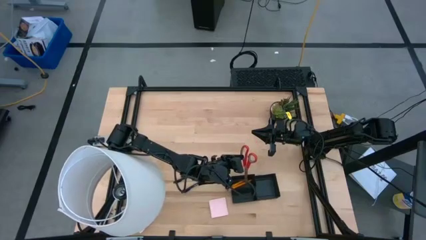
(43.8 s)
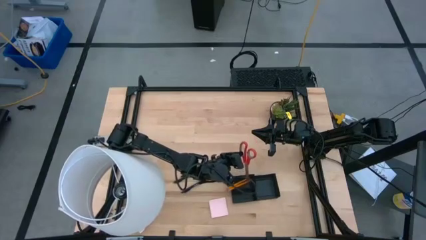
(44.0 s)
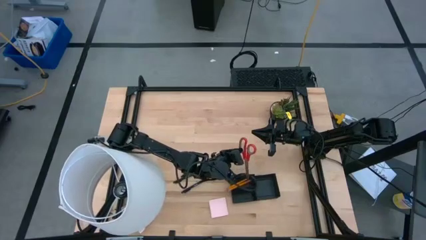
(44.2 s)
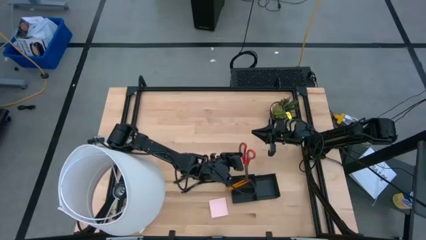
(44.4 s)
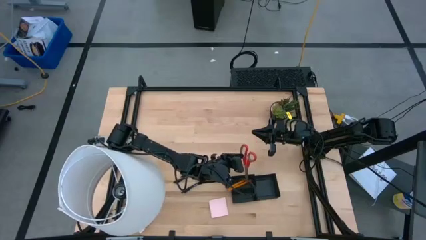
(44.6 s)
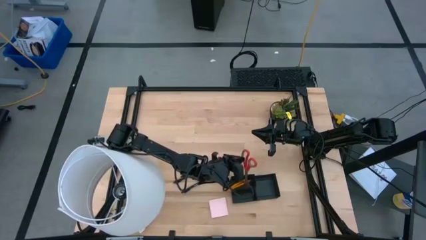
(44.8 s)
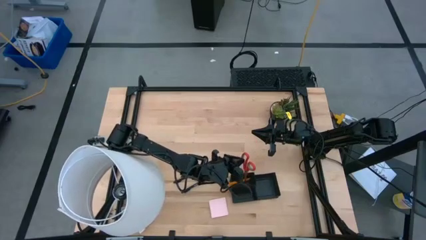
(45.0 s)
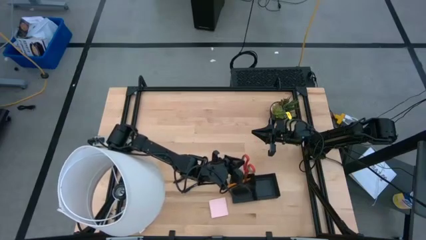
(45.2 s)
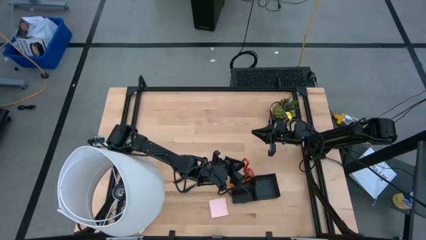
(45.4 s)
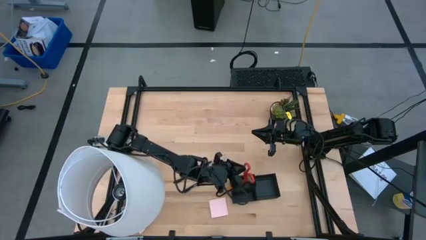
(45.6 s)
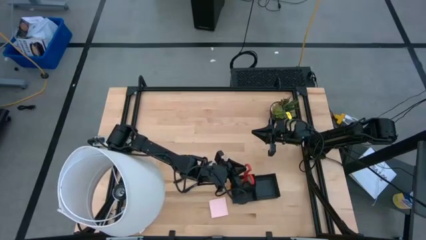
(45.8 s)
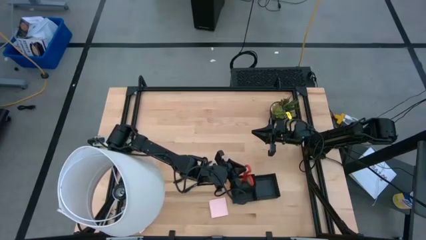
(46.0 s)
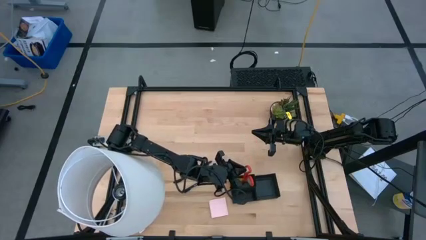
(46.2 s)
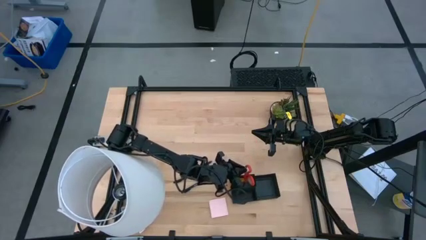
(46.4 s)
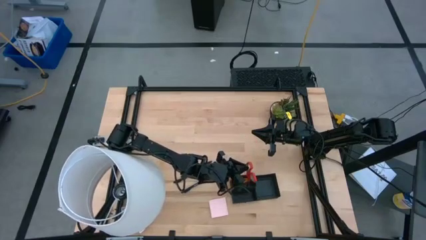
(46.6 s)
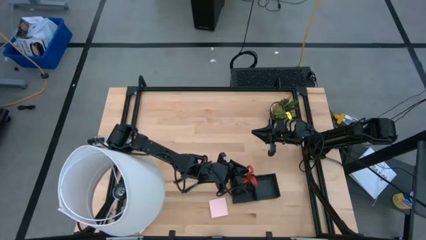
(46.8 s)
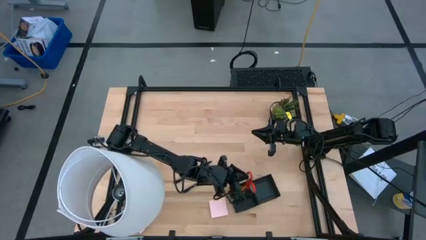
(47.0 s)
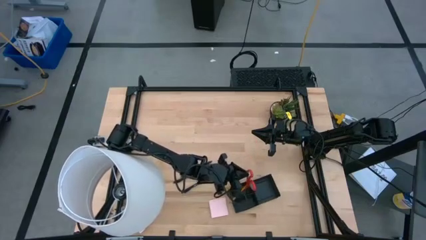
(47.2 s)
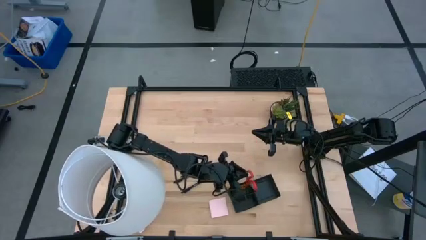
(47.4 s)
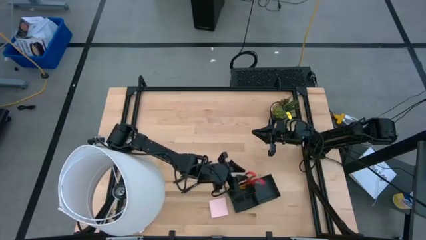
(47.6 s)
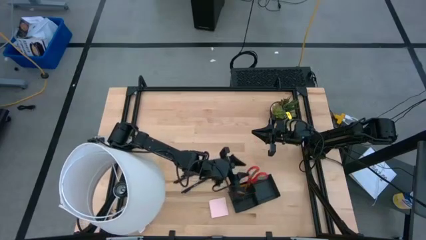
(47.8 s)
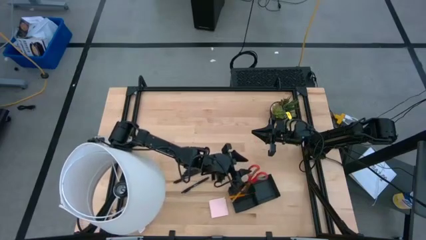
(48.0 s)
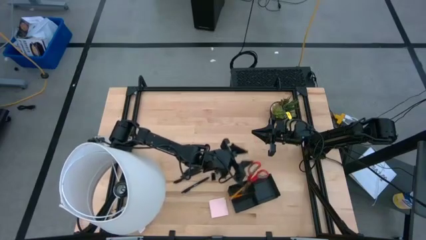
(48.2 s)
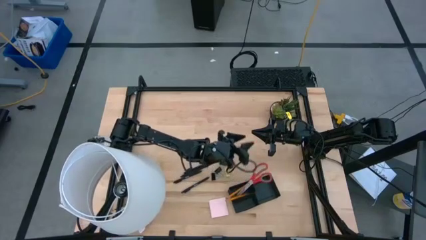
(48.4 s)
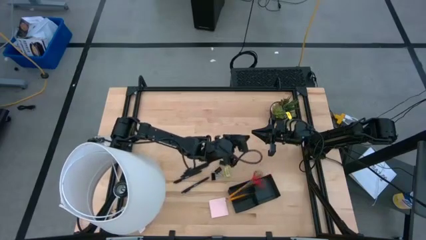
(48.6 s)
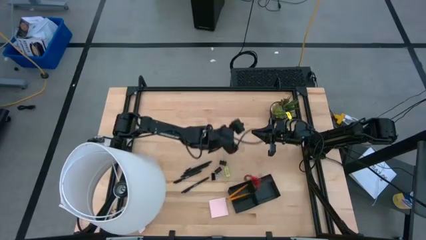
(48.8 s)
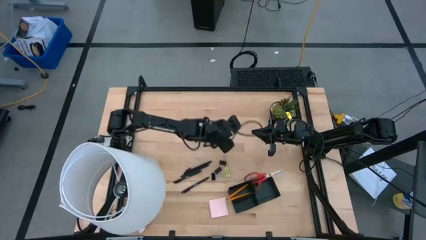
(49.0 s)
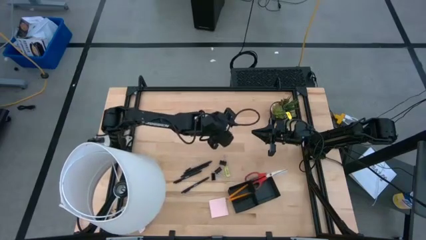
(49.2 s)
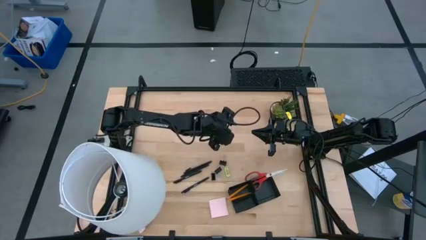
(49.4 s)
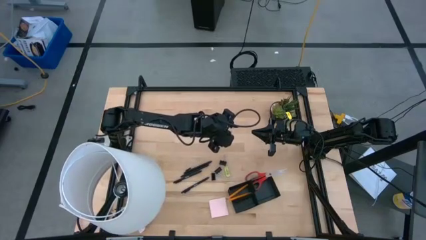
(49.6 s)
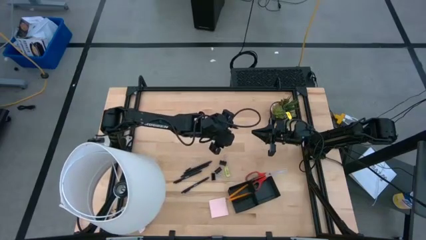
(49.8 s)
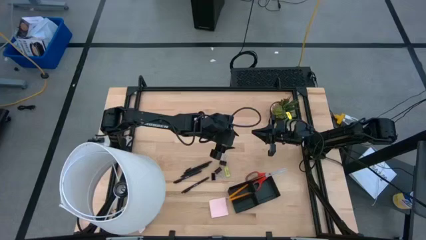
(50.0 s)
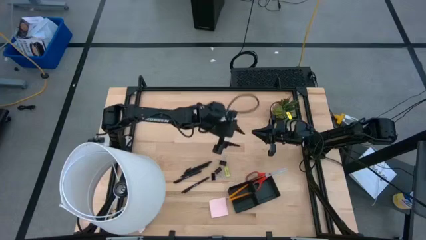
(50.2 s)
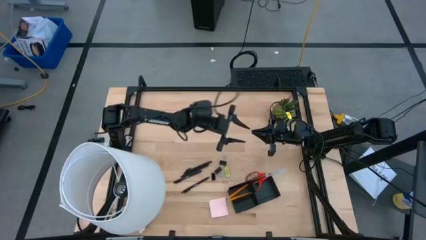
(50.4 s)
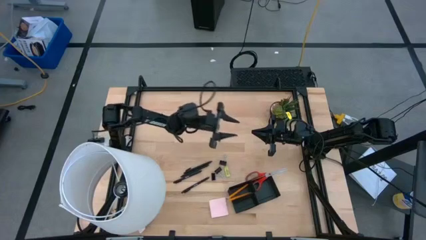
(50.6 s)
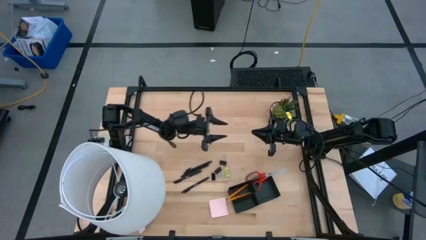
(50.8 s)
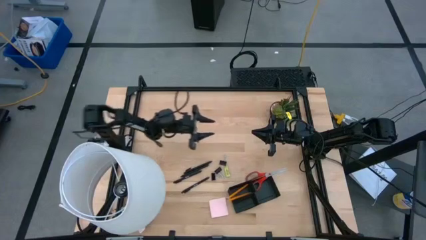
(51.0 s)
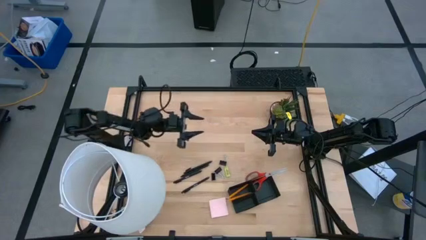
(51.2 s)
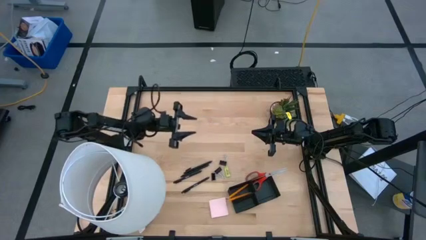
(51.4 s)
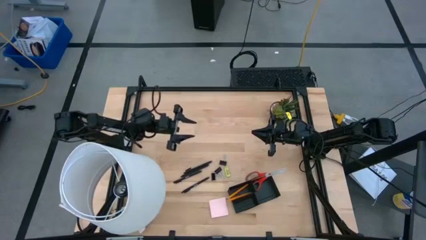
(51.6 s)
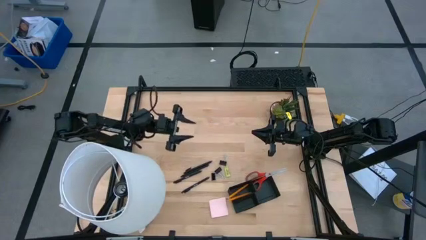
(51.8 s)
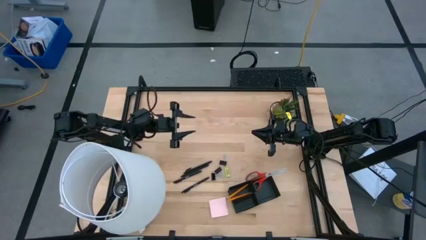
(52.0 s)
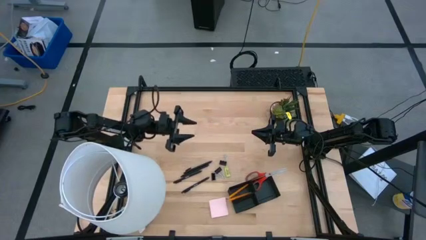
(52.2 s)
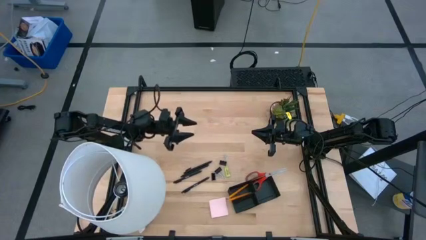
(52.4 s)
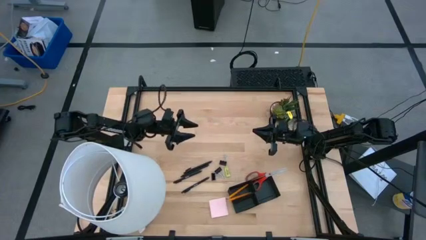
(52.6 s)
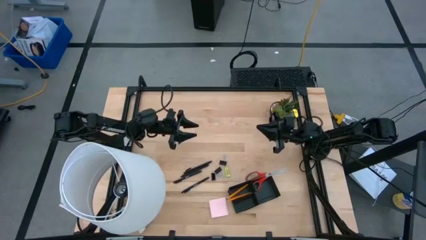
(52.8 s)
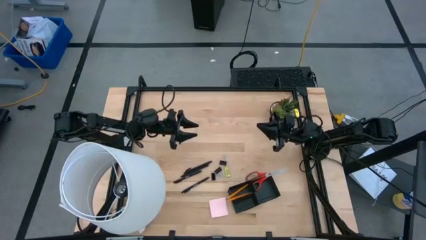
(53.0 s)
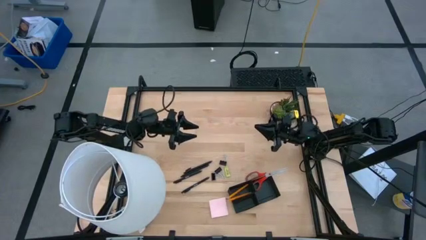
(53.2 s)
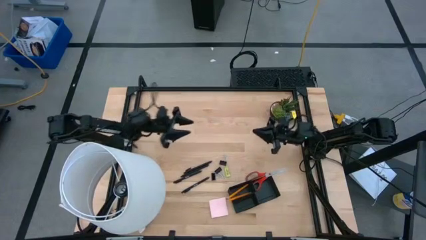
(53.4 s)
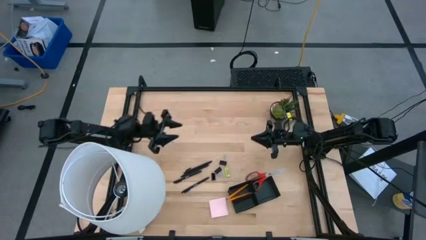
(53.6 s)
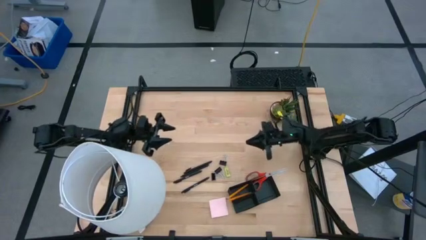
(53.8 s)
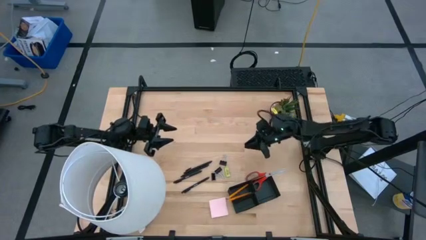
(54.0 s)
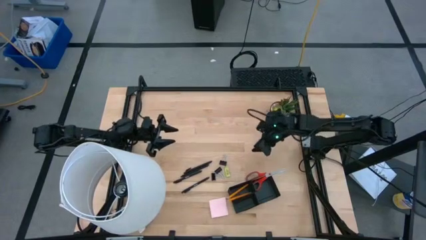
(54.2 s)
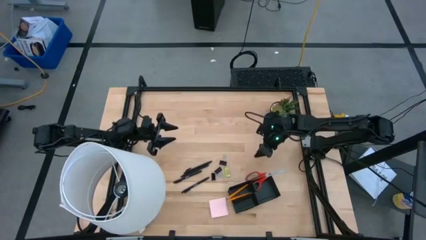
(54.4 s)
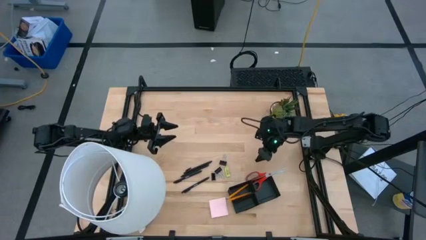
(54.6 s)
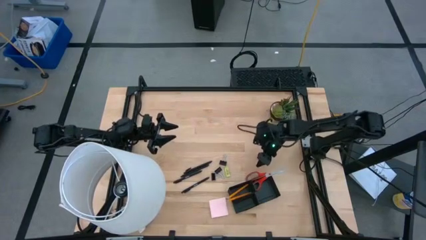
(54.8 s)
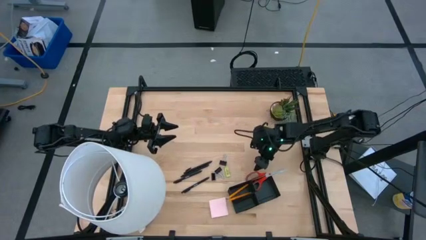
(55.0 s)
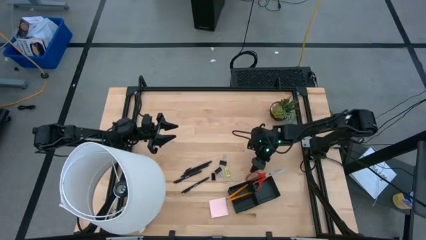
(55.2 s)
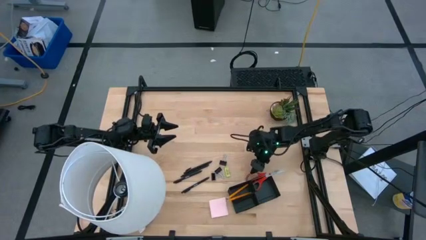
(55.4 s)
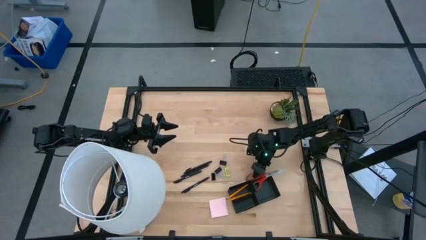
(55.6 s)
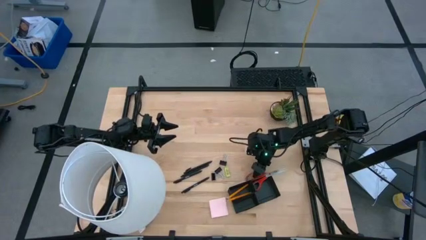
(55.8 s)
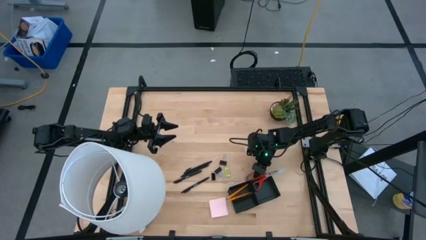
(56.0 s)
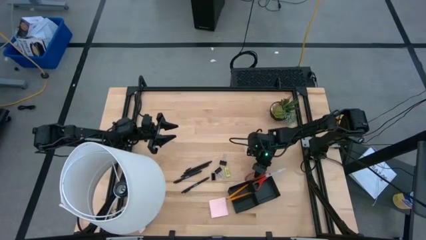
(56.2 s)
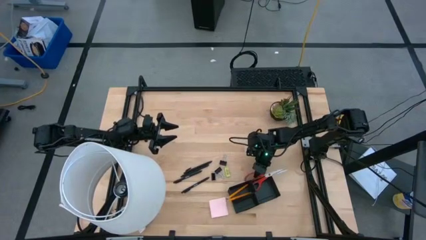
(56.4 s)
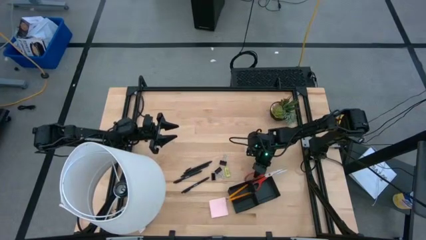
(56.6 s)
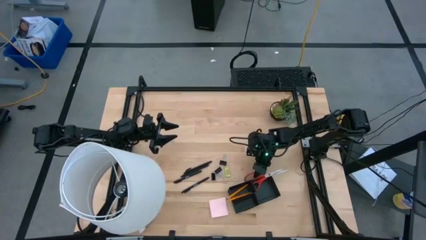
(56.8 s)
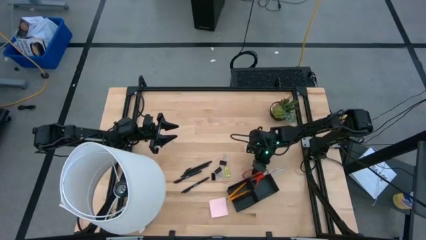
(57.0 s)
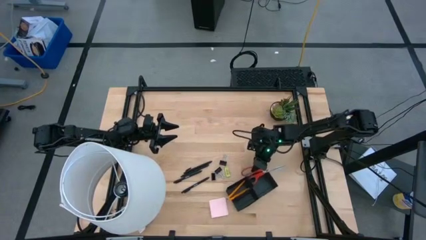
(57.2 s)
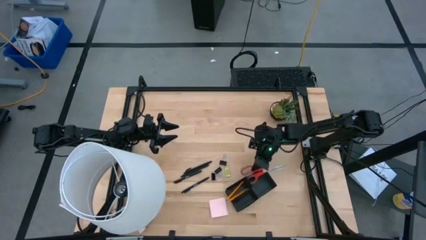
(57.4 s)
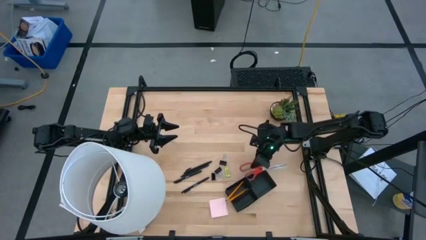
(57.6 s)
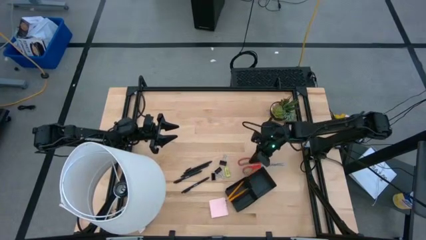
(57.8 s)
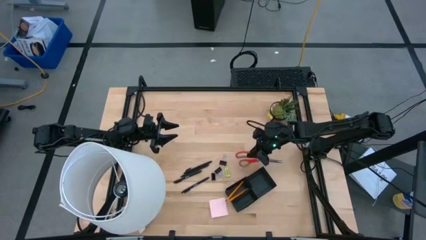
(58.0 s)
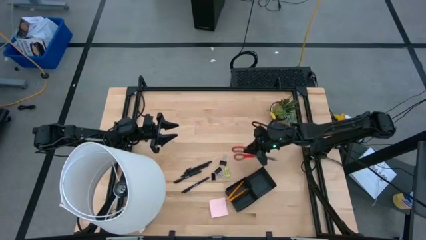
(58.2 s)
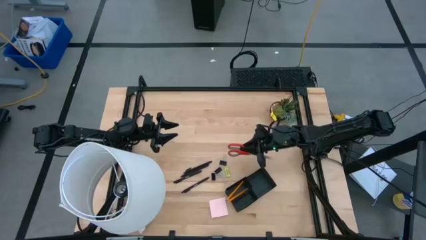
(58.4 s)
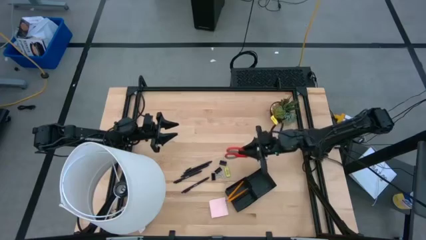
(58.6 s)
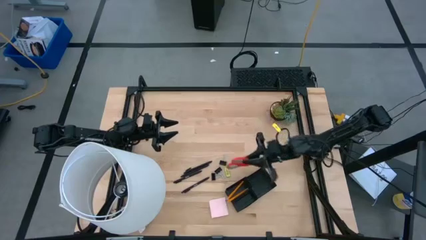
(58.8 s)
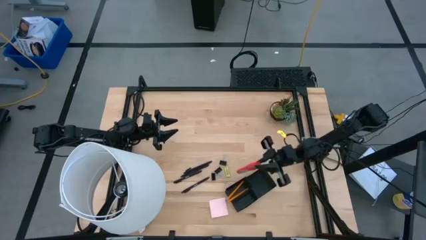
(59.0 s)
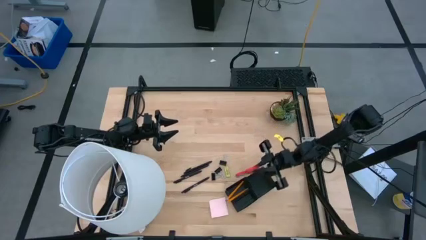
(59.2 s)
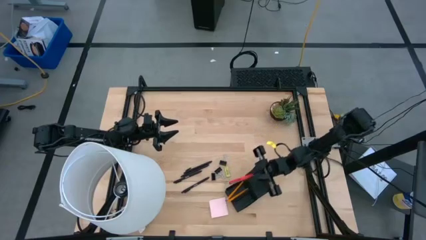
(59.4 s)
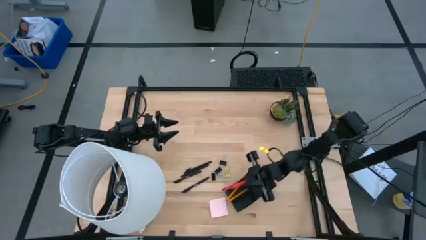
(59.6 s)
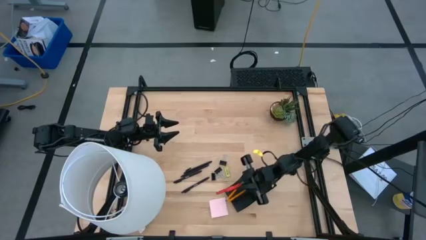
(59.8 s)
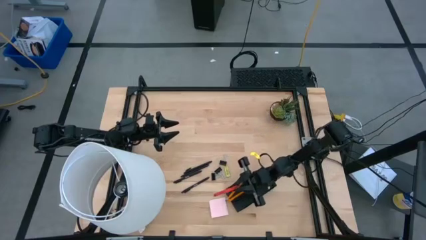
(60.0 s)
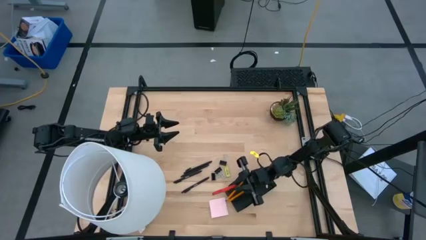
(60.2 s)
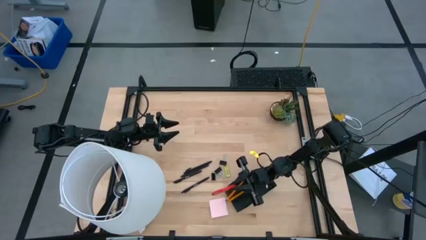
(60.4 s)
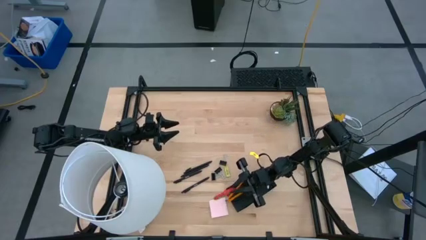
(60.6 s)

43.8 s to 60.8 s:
Task: Pick and place office supplies into organizer
Put the red scissors into the black desk organizer
